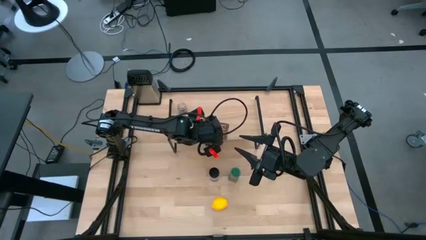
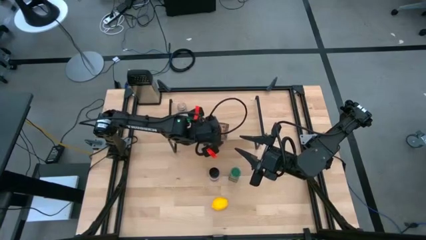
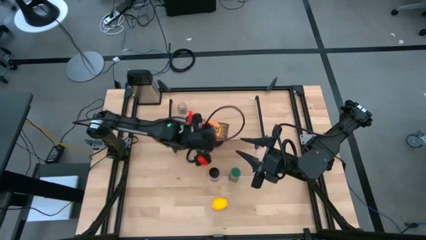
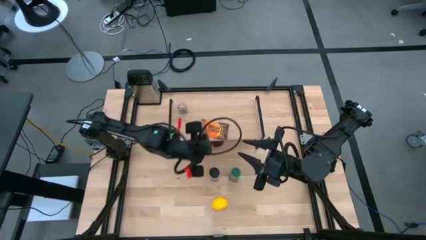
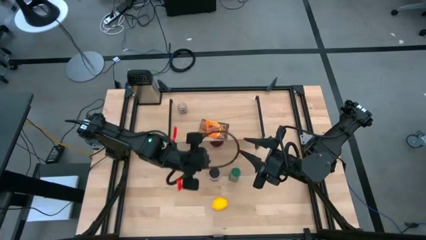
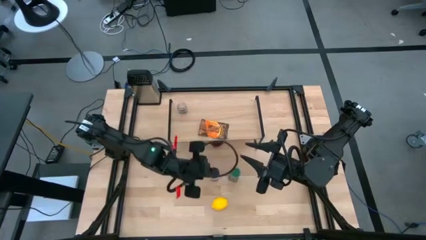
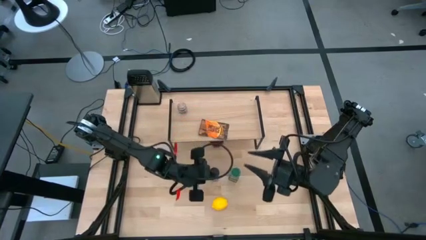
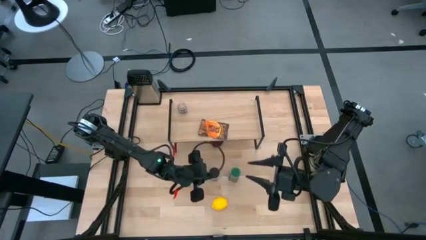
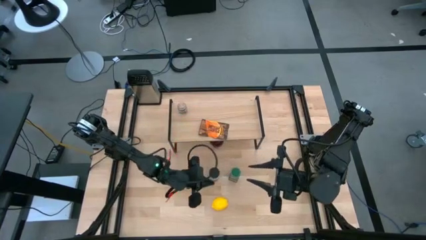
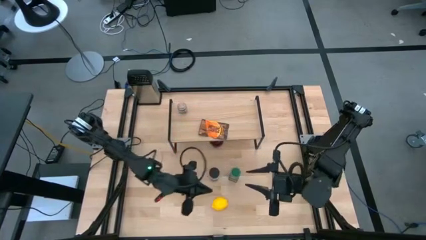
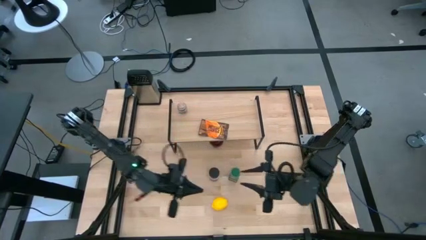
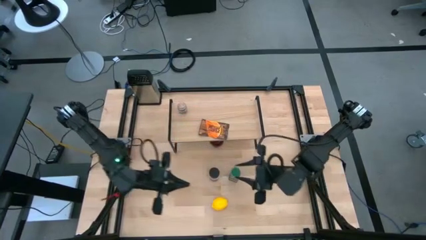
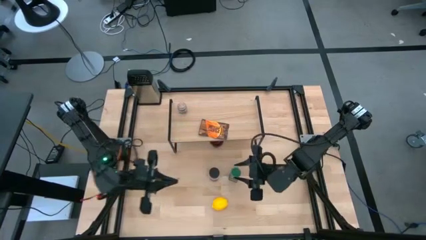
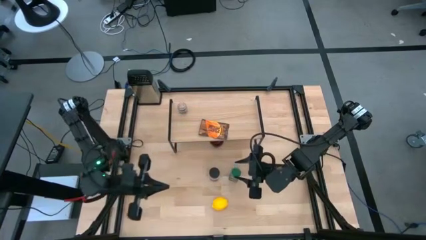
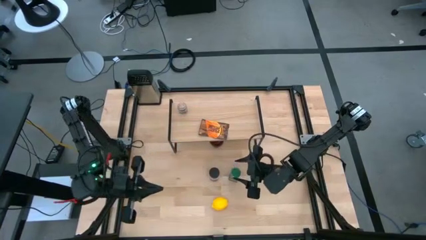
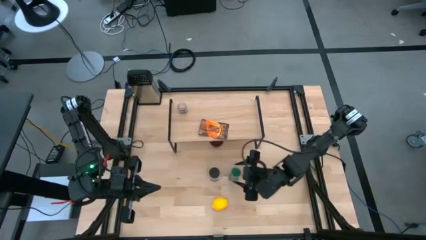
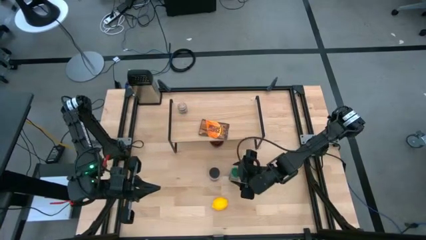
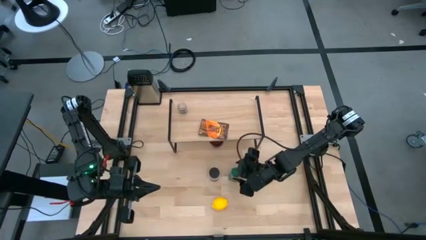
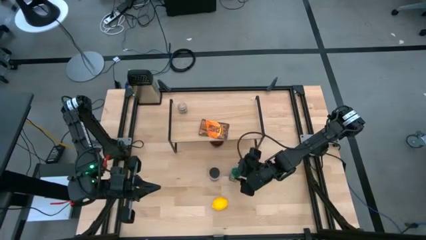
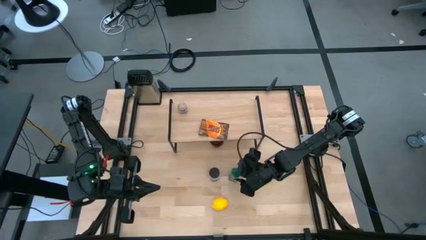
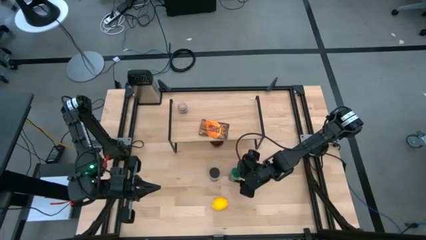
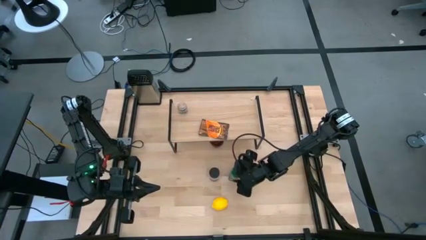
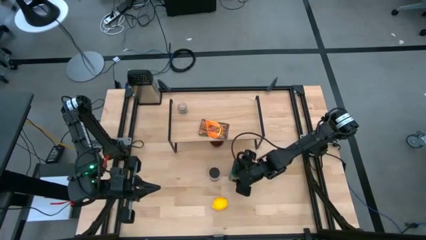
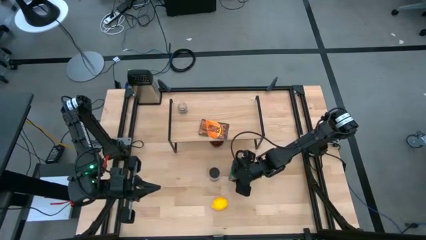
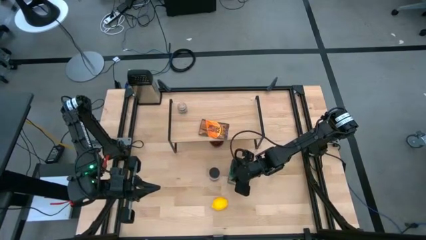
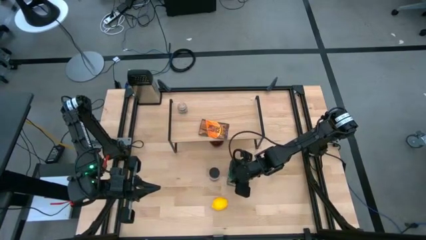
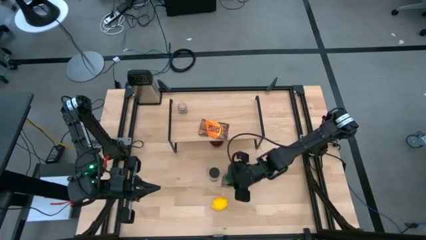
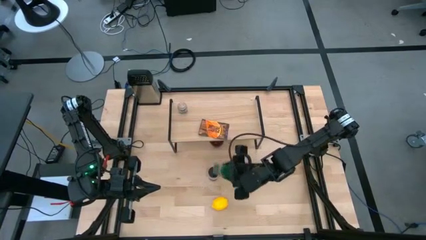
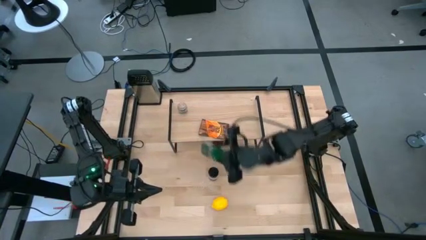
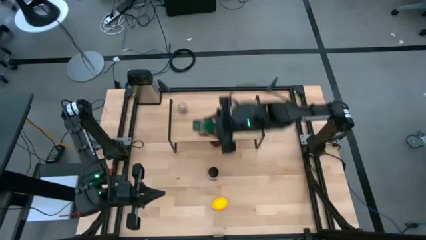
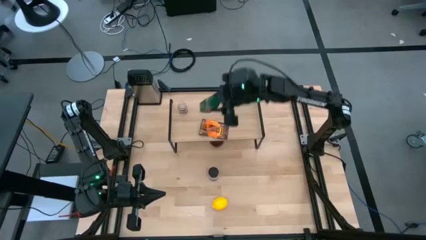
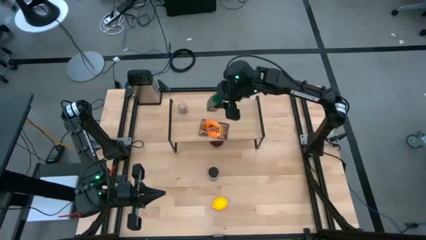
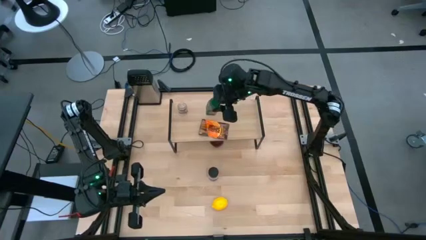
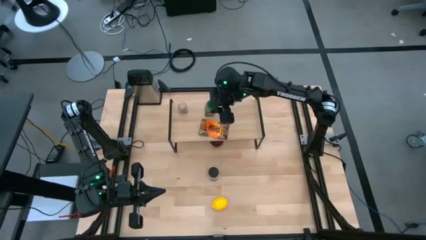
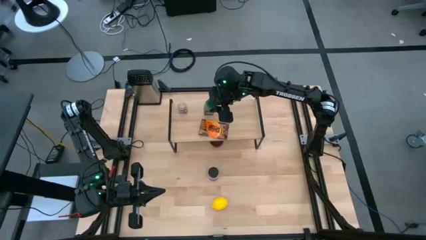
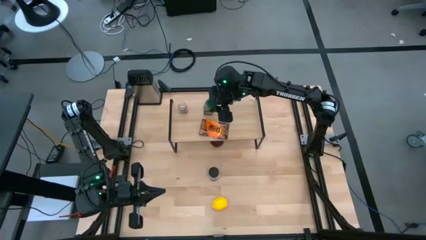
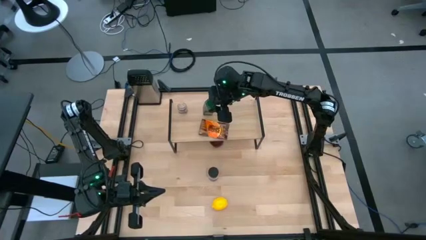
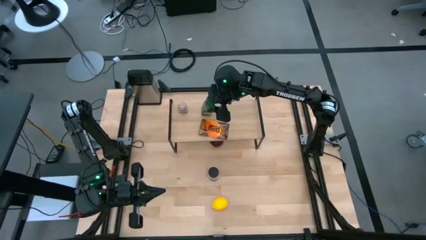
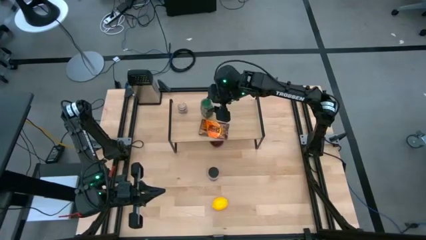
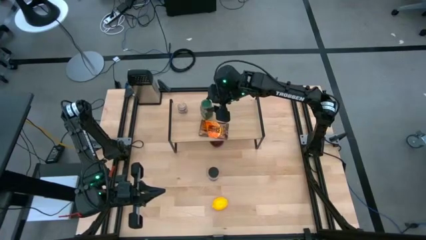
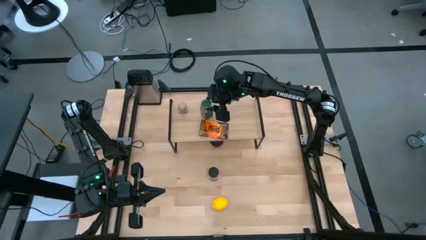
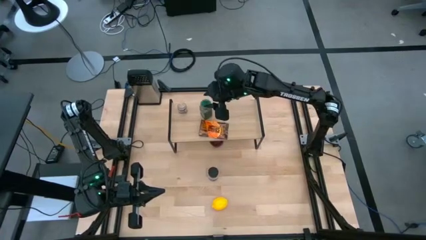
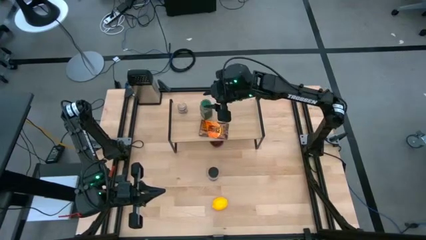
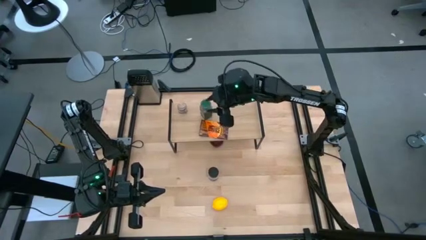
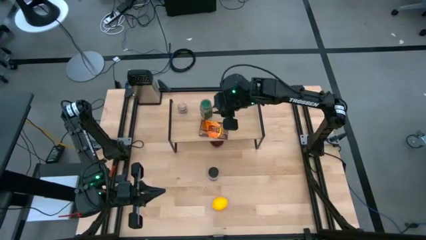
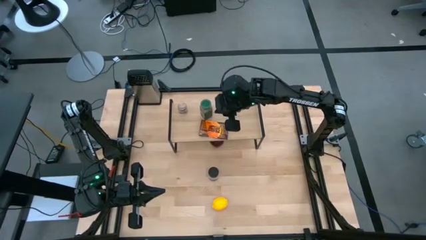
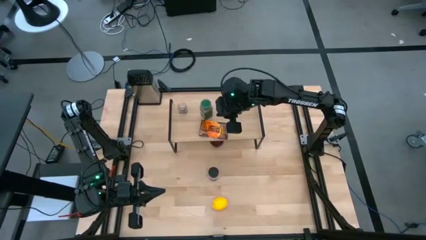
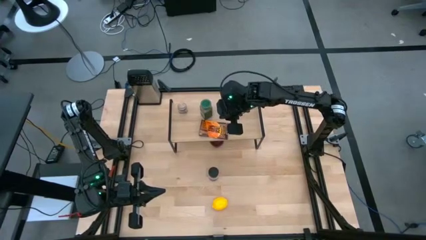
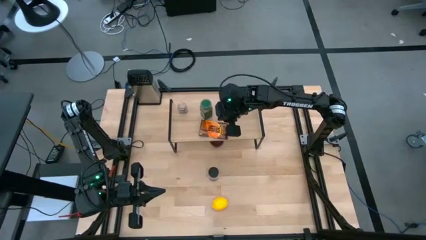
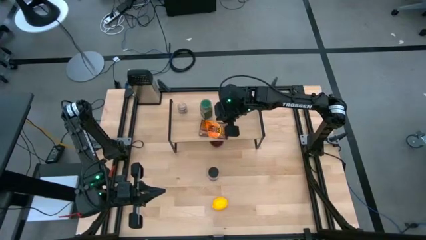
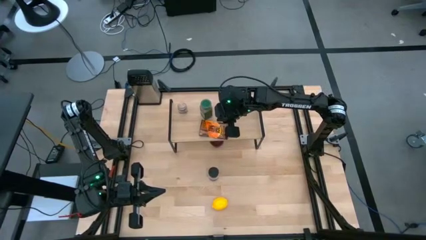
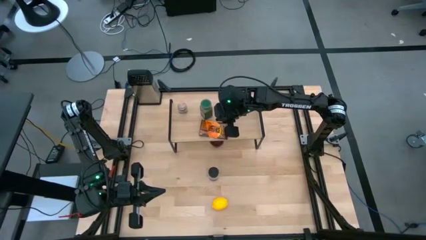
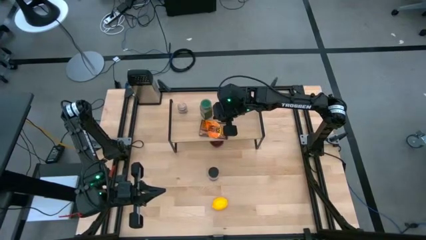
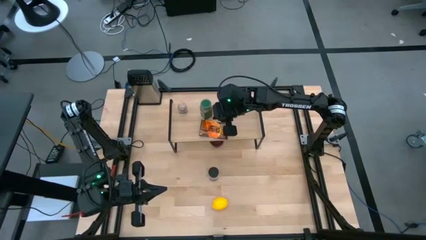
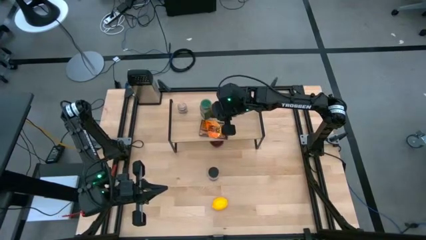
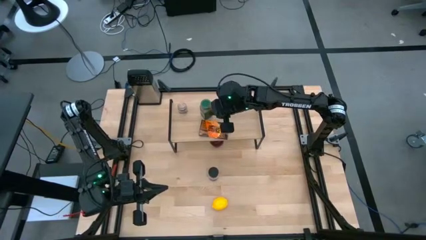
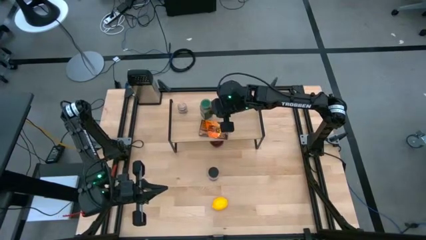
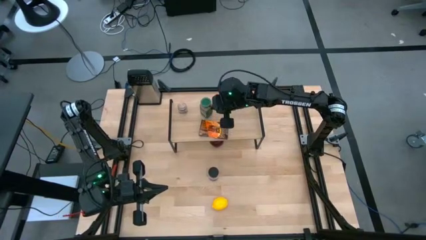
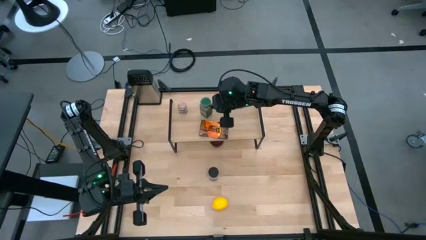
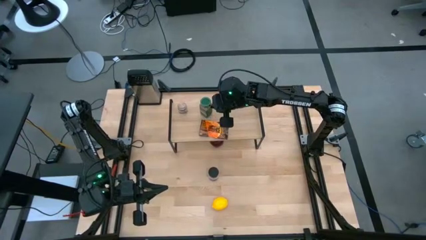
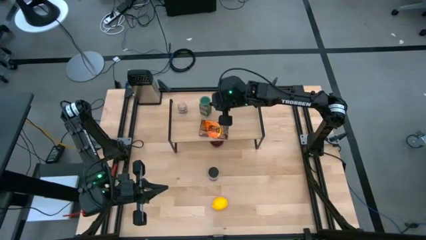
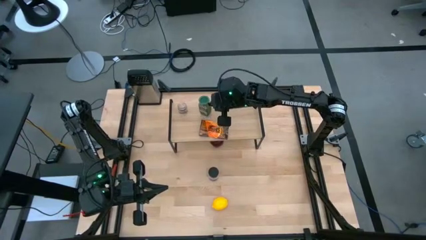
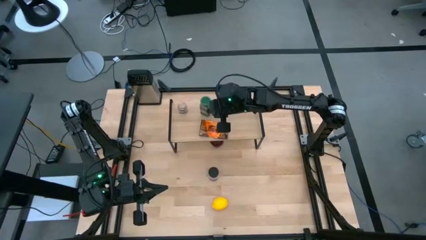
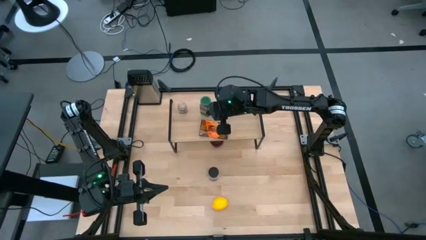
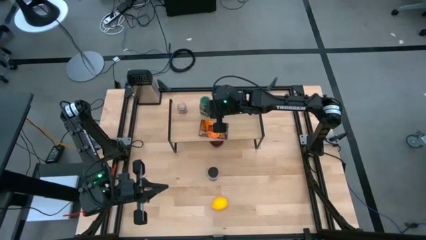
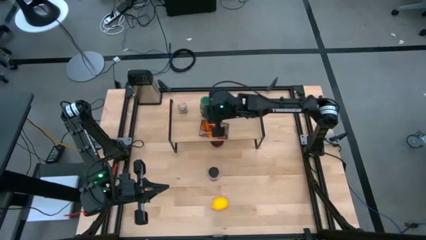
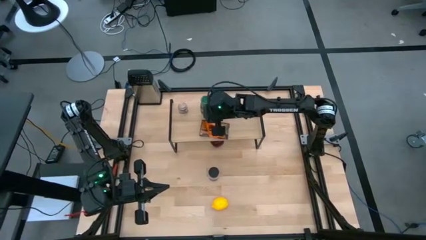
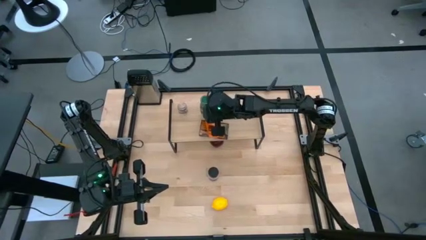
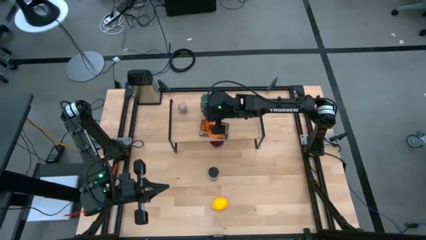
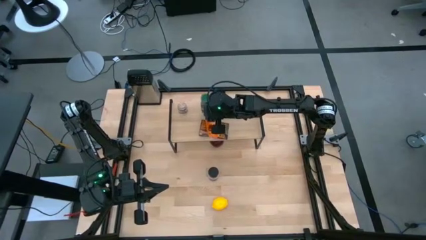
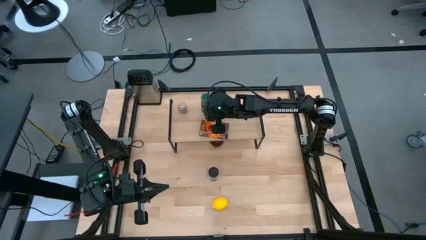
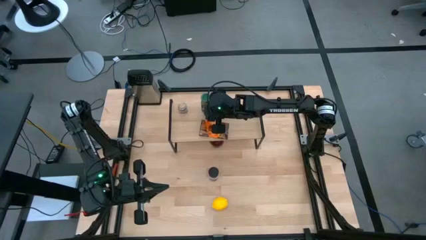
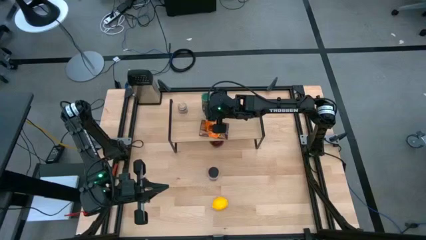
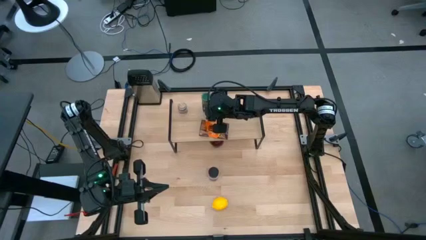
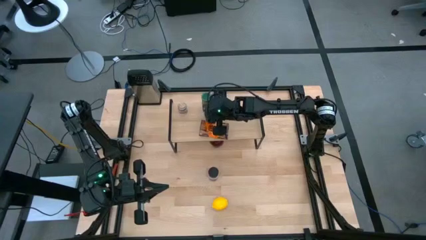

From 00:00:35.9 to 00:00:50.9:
Task: Shelf spices
Put the green seasoning bottle on the shelf

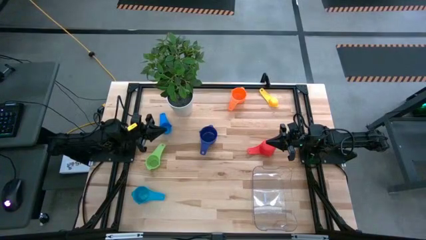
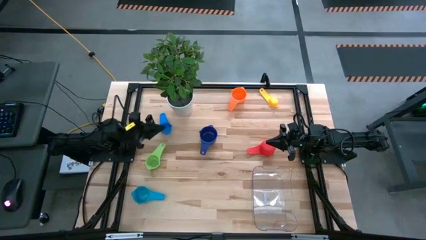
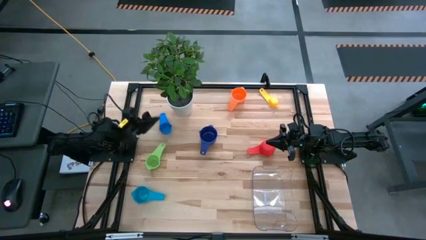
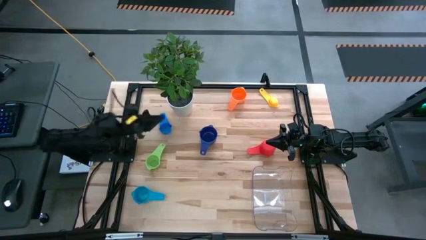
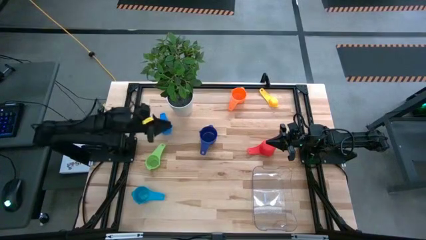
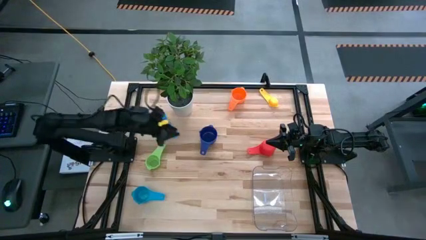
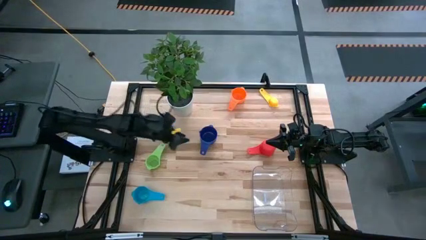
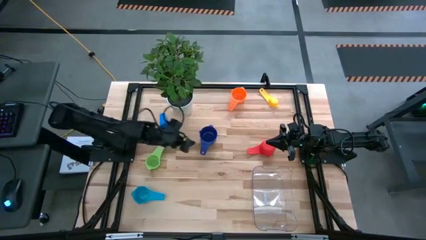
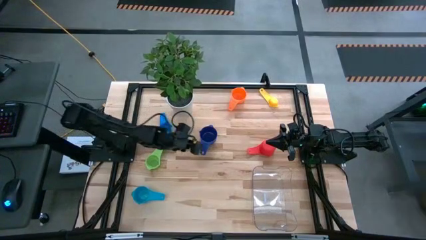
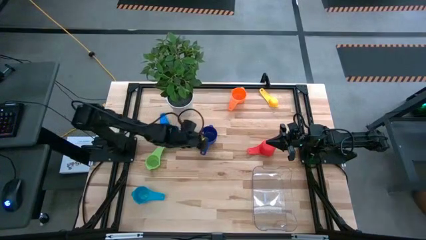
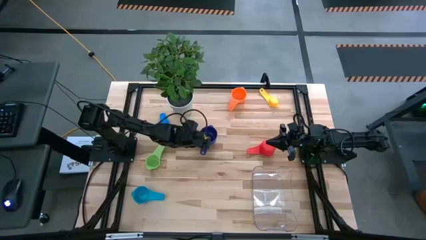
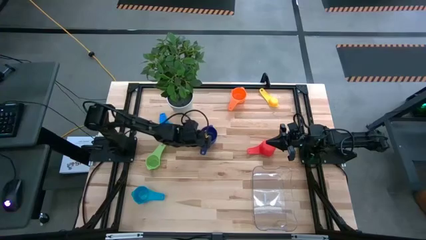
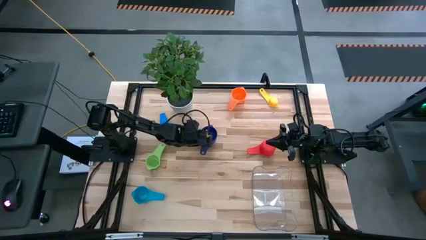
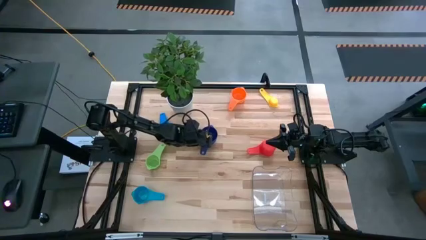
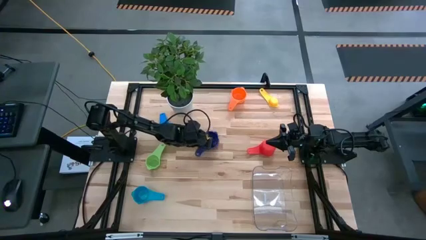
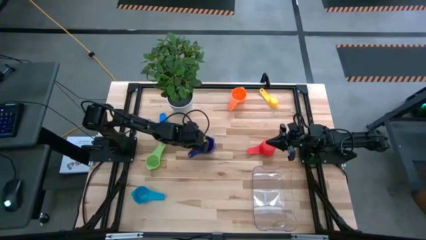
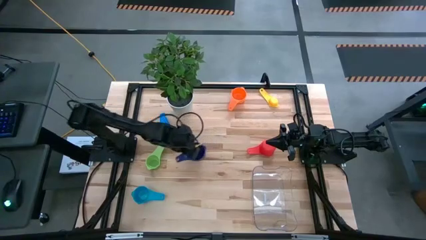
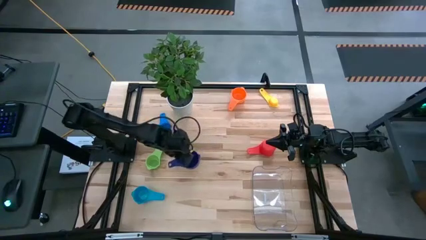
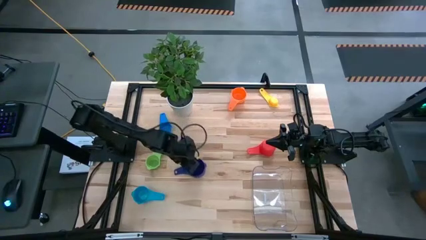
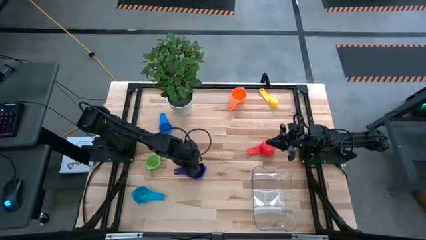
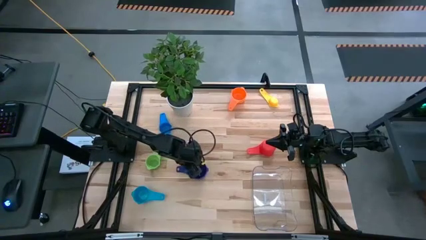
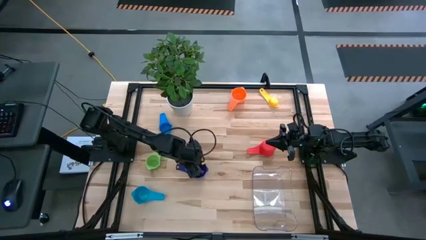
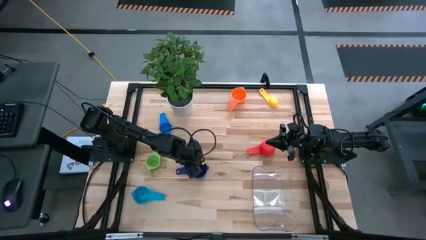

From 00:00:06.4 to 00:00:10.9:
Task: Nest measuring cups in basket
Prepare the dark blue measuring cup
